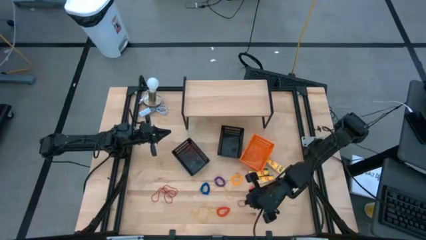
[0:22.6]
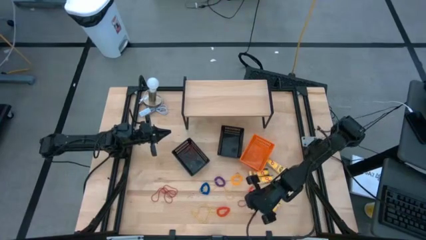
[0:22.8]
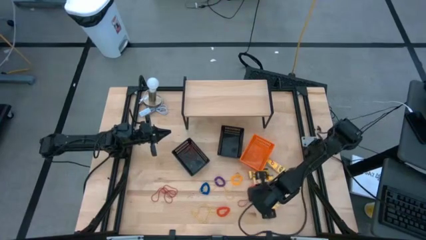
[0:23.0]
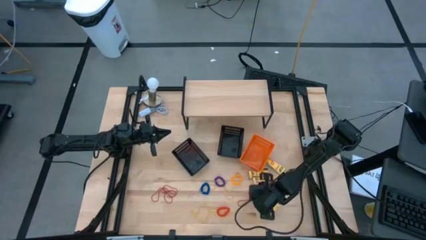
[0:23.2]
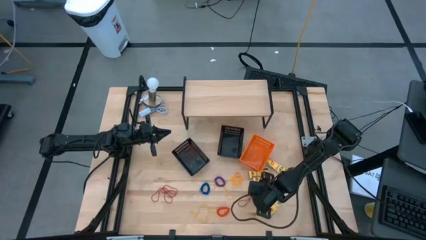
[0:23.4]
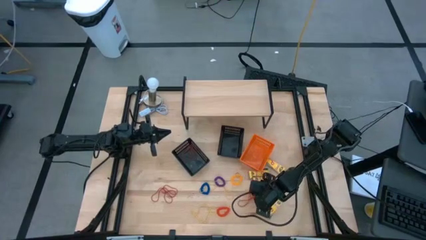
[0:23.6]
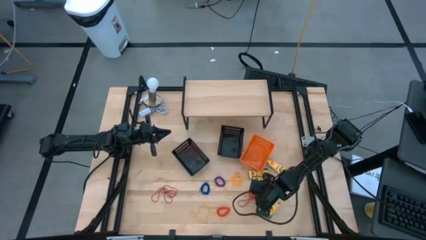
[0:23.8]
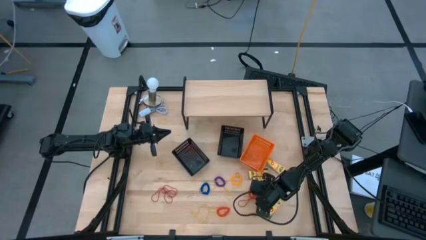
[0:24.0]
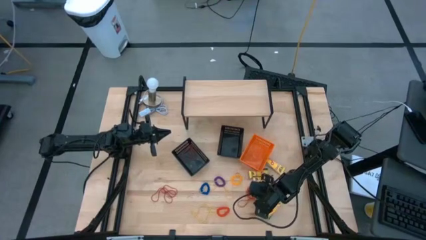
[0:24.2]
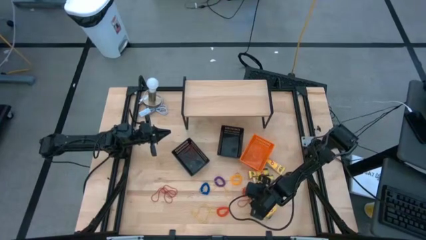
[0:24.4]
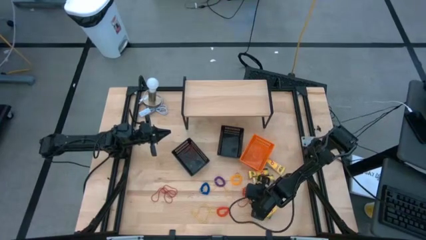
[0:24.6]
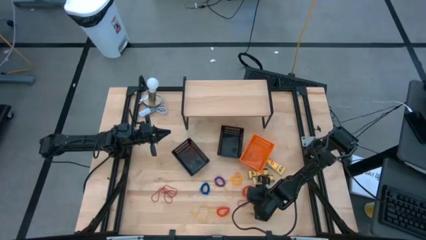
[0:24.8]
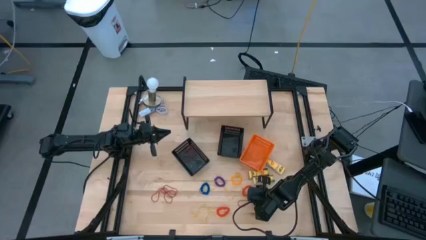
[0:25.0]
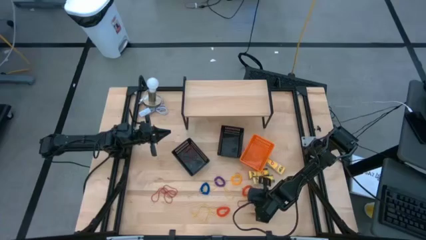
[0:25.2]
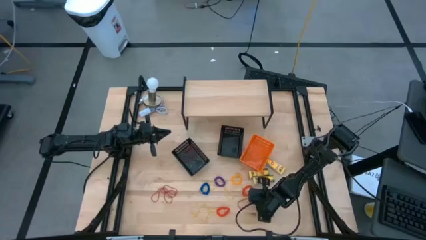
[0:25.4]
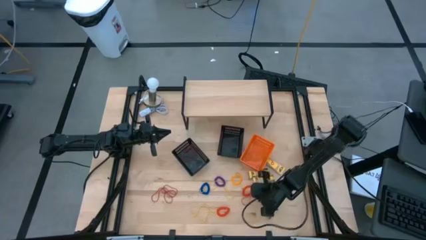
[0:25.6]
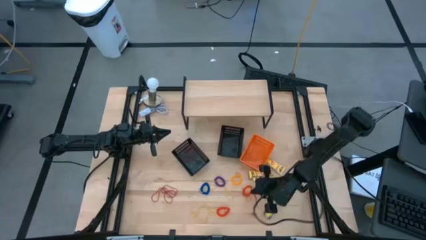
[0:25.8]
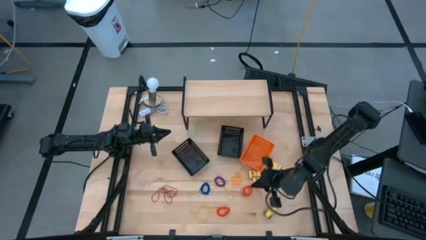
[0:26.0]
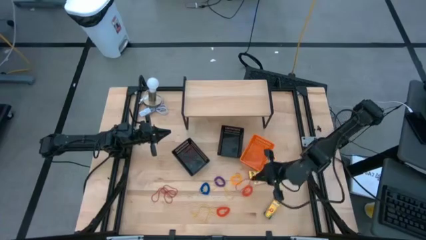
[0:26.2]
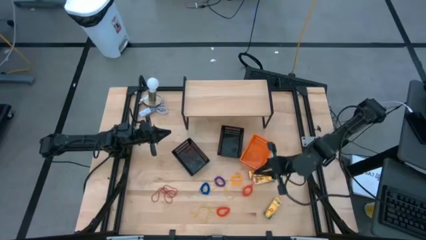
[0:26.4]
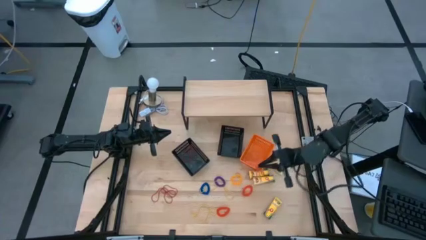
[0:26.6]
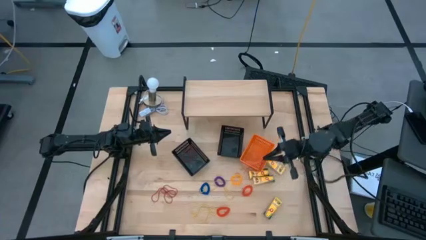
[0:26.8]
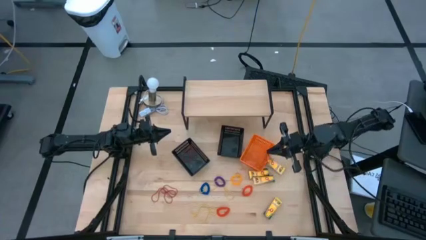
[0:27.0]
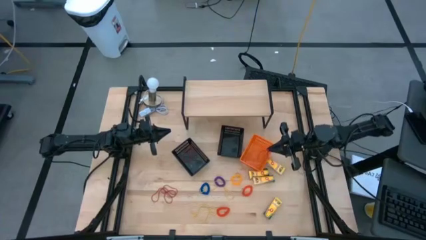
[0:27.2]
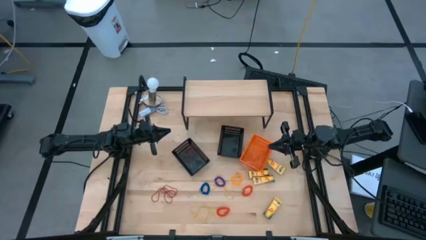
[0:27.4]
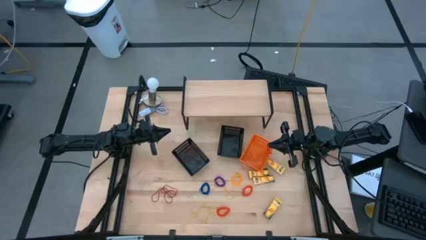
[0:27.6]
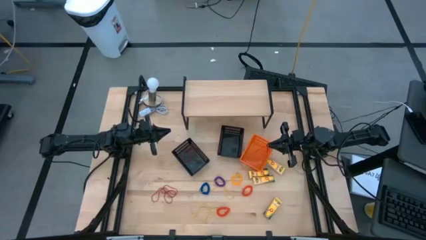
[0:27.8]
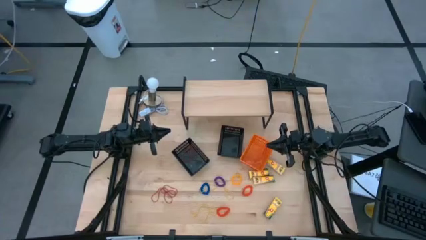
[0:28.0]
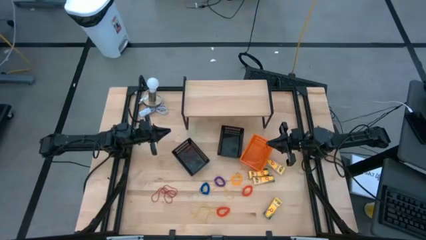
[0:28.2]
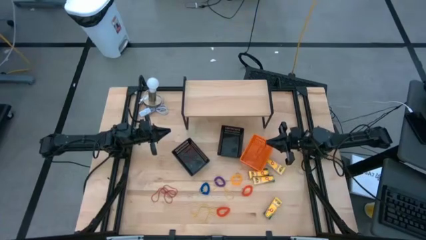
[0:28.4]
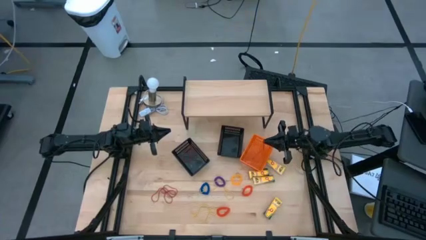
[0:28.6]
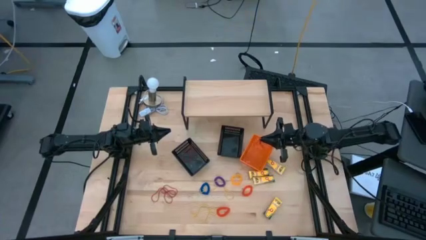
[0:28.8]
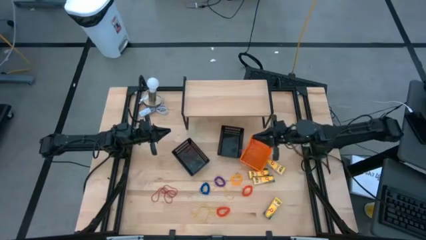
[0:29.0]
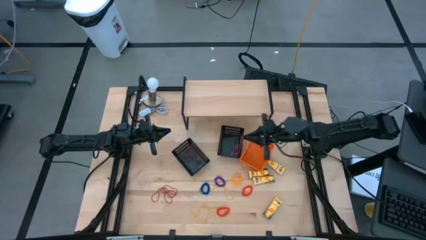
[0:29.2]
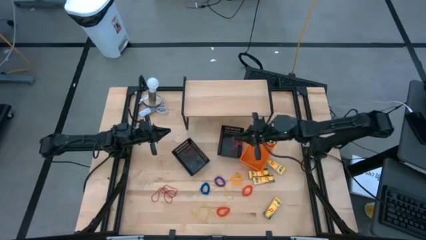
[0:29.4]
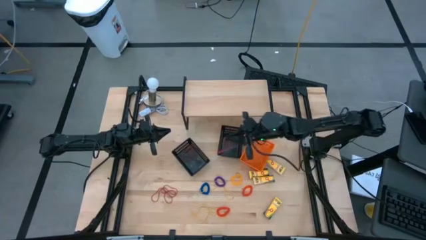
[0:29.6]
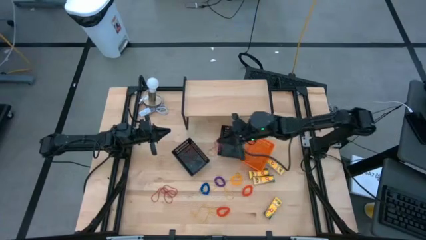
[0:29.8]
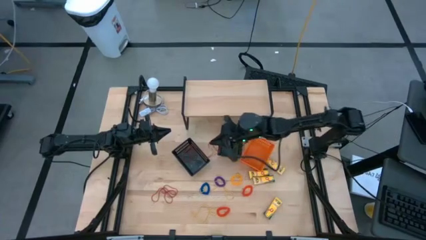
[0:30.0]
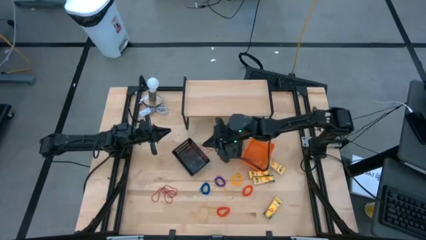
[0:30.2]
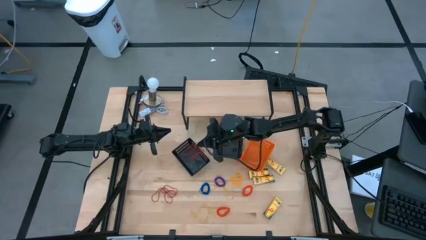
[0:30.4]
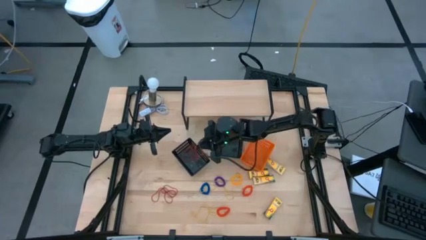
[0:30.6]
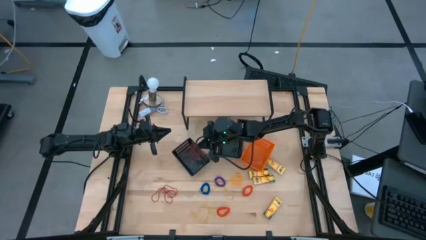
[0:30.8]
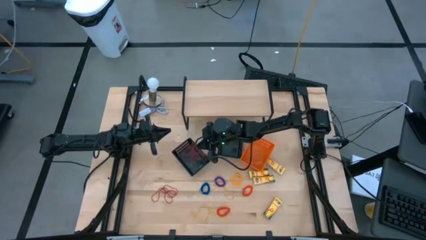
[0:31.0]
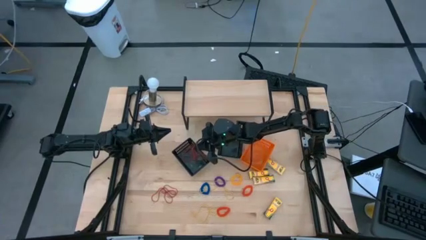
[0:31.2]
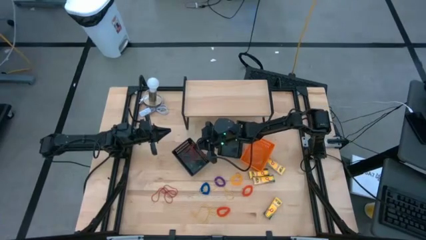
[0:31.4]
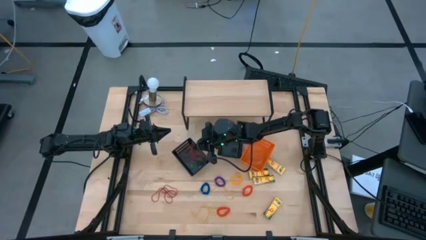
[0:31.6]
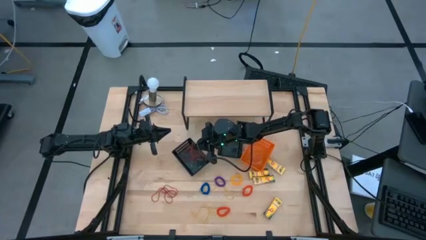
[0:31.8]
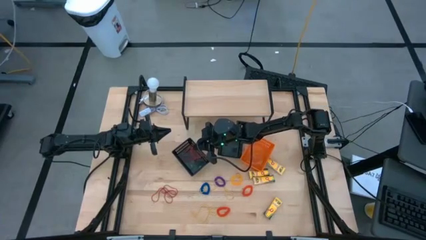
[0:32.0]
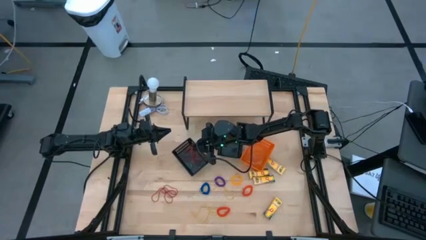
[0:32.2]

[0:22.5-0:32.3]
Task: Pick & Place Office Desk Supplies
Put the red rubber band into the left black bin

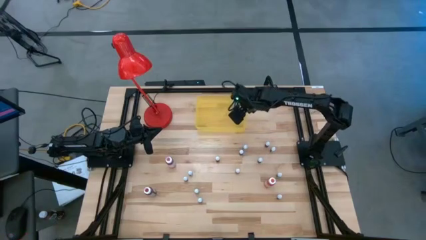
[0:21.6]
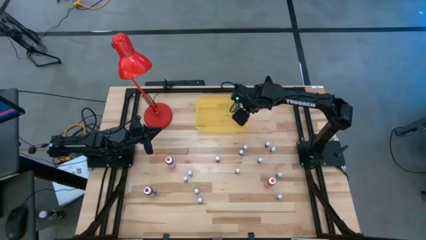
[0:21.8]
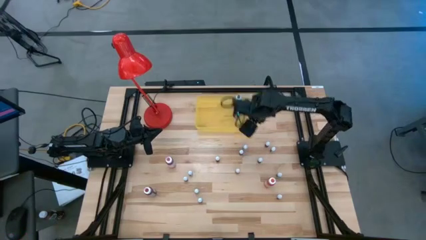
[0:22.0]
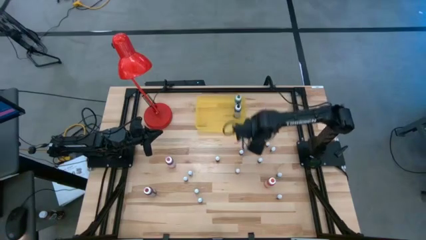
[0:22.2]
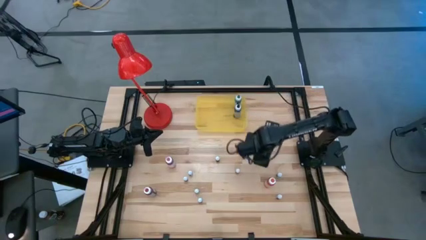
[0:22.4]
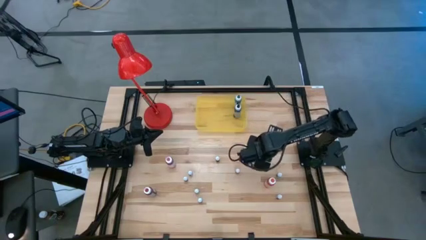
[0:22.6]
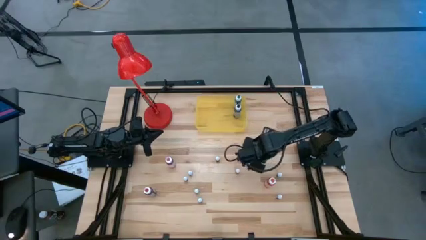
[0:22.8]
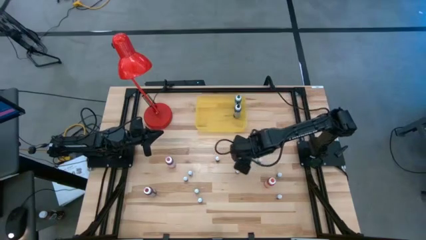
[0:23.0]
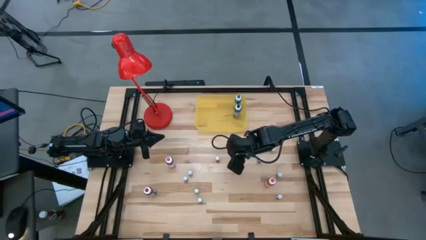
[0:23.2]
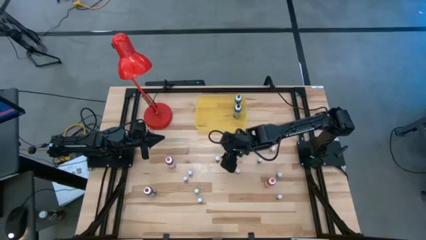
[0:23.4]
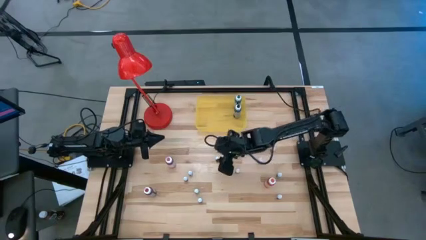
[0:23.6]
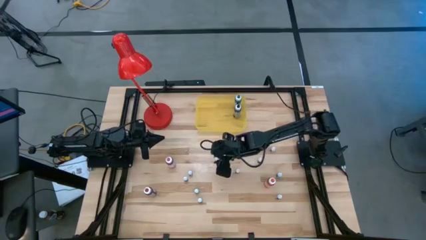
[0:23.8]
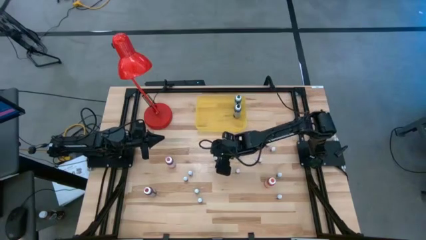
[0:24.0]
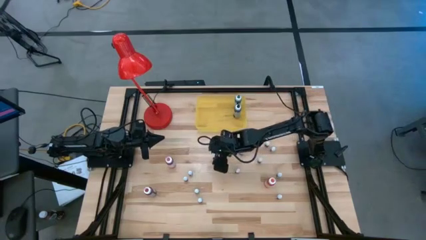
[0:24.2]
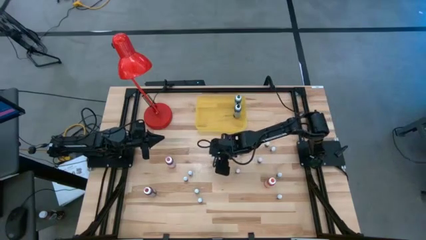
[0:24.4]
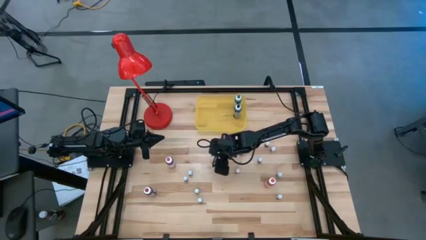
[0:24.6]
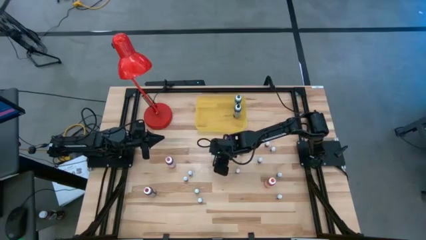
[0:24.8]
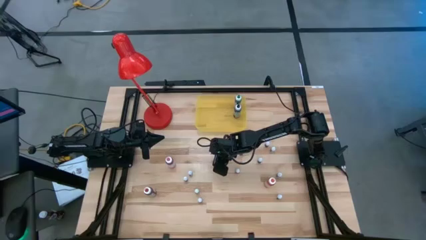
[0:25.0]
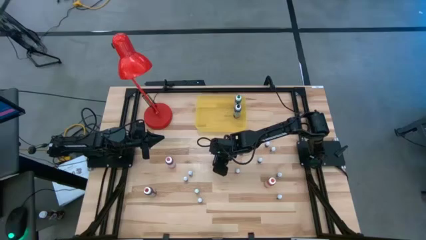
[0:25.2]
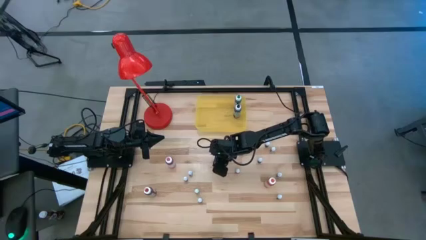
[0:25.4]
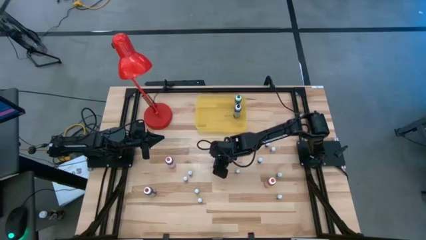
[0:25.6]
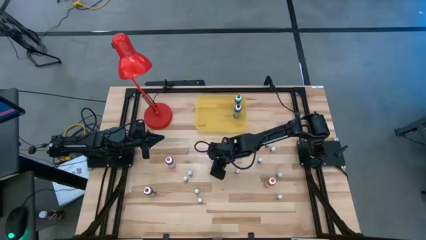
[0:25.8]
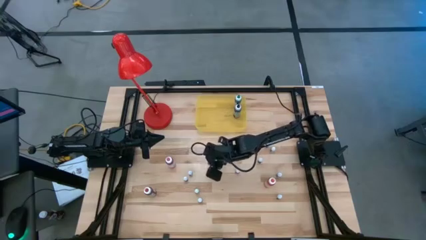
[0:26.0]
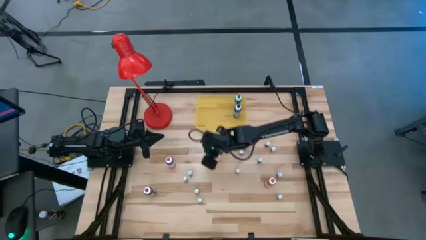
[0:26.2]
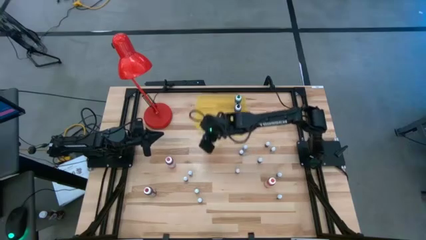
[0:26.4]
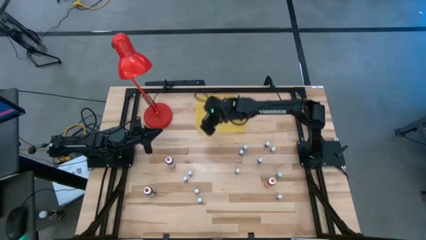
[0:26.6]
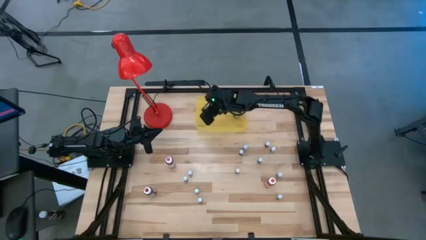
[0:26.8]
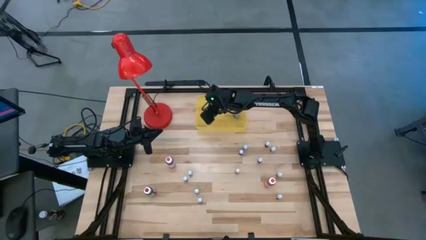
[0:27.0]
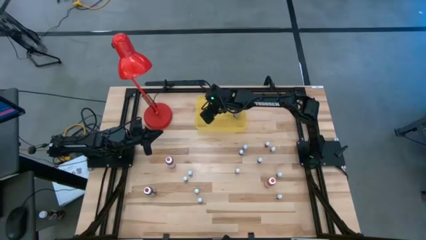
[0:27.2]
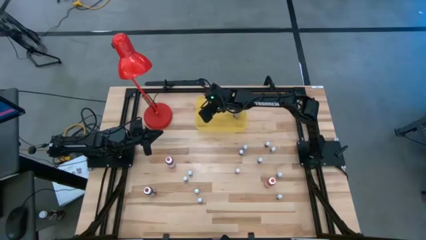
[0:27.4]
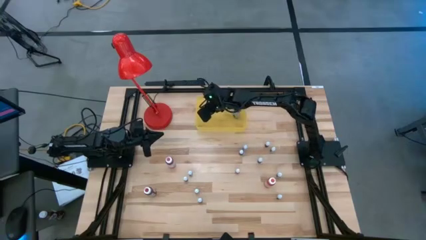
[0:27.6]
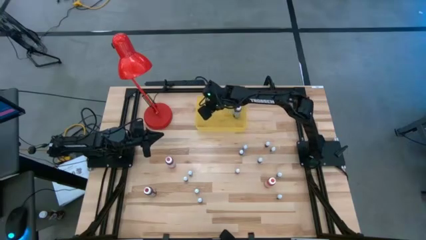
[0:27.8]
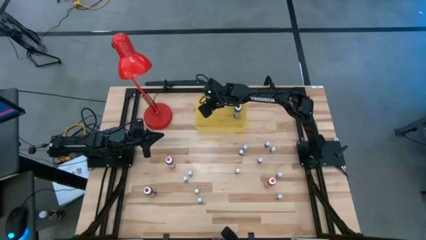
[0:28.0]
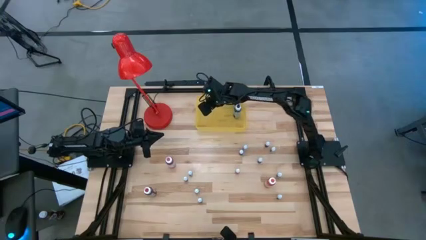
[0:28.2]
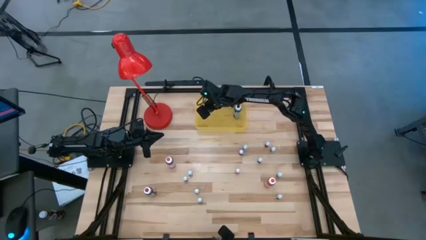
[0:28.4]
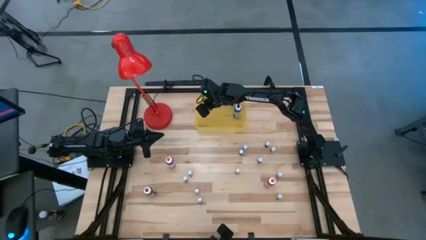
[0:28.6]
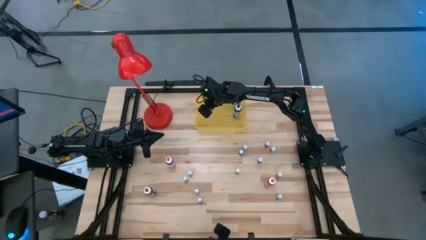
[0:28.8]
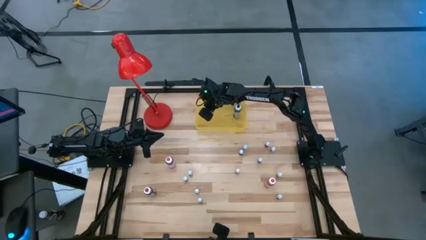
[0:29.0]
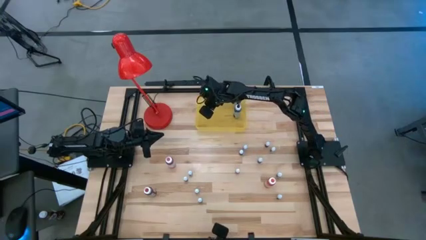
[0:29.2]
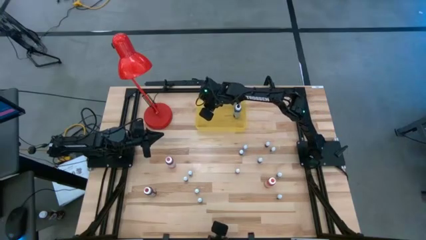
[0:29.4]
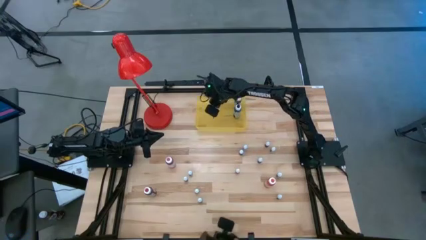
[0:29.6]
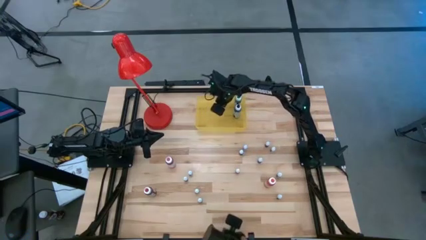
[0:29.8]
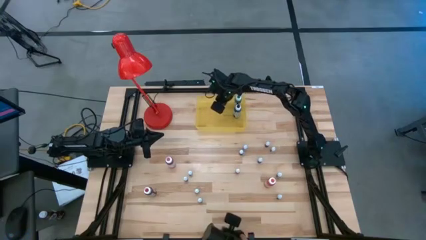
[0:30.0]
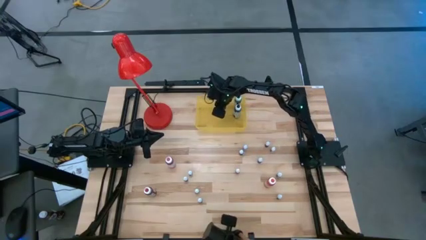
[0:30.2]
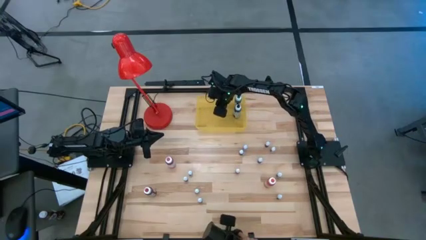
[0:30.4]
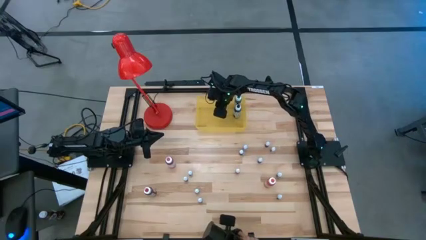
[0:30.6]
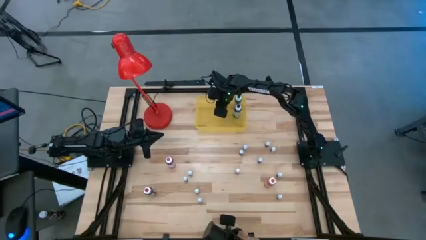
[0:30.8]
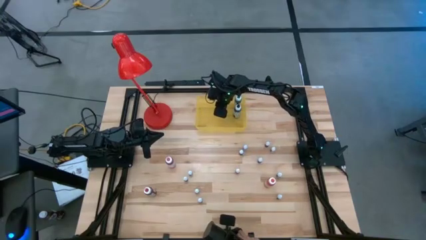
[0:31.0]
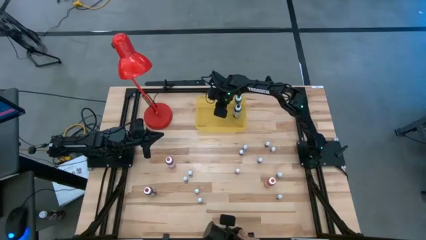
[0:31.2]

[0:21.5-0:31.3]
Task: Pick & Place food coloring
Put the small black food coloring bottle into the yellow bin
